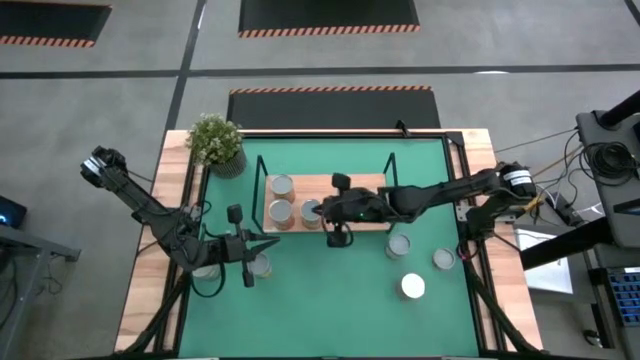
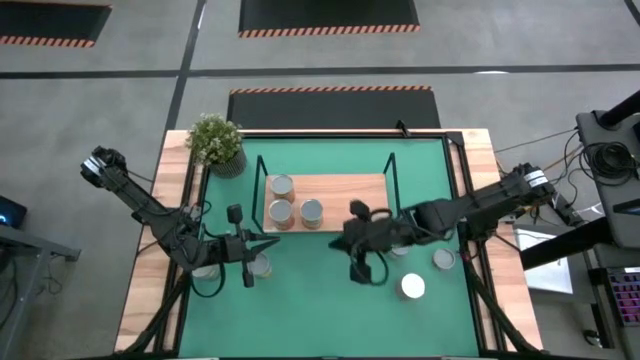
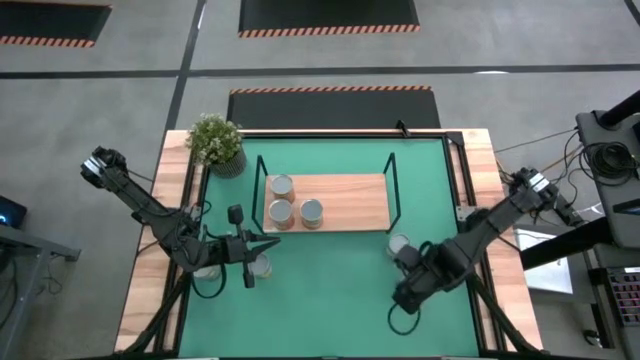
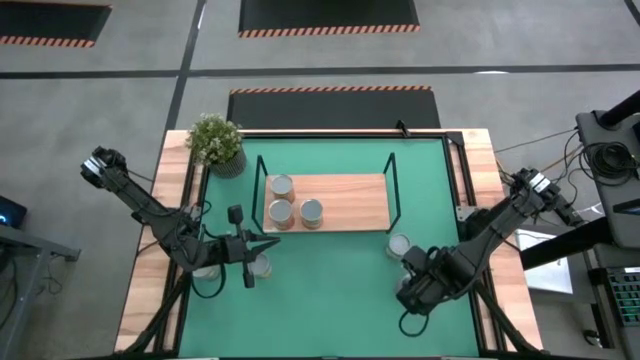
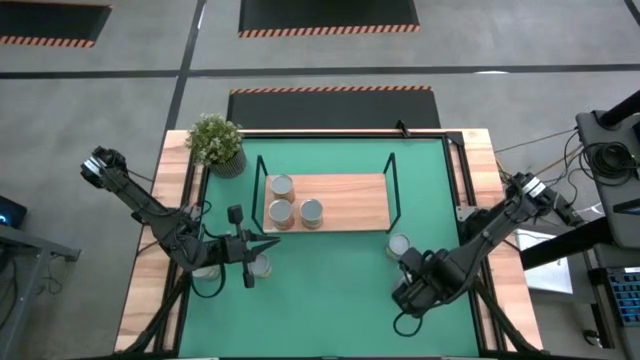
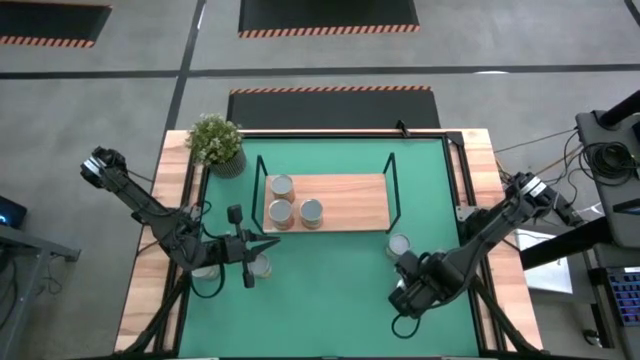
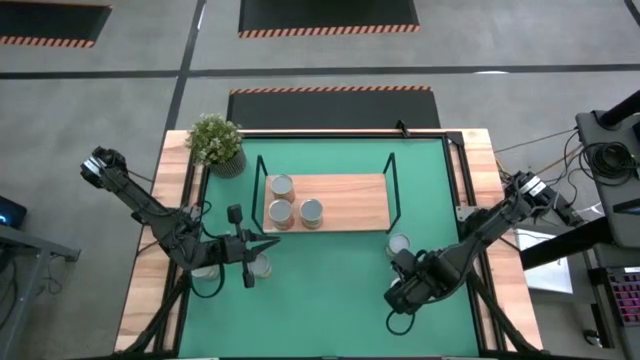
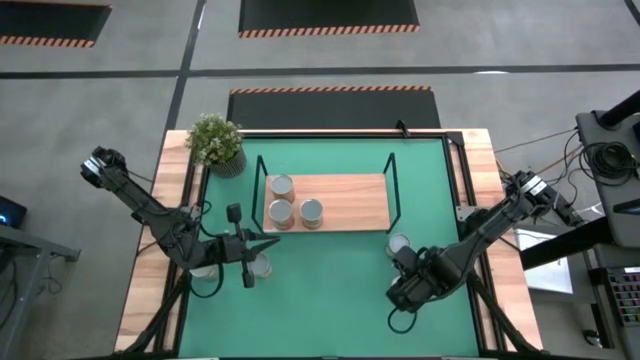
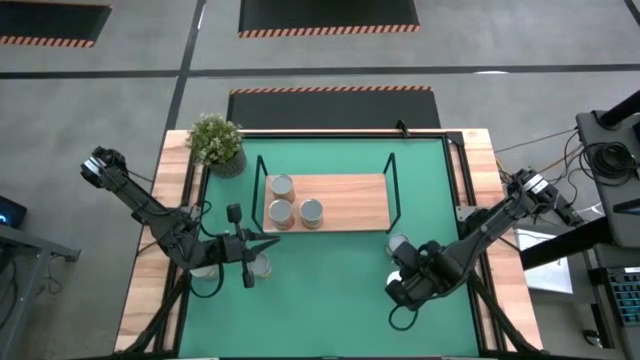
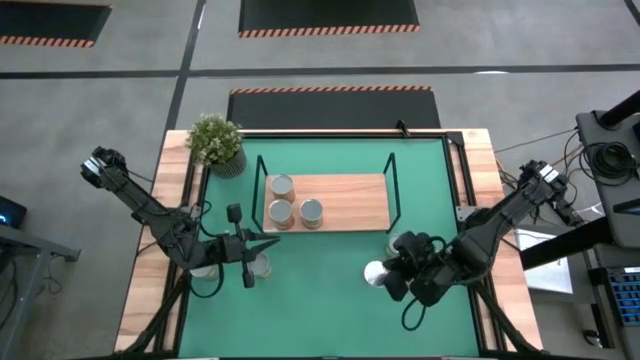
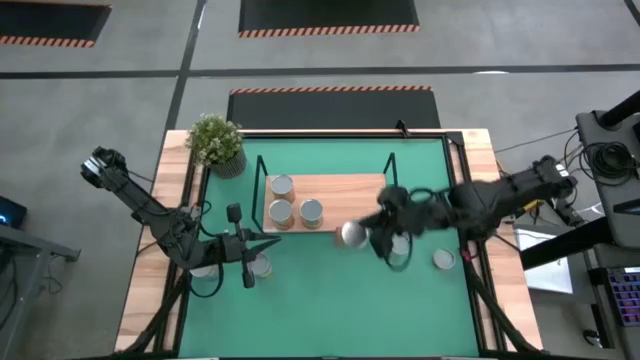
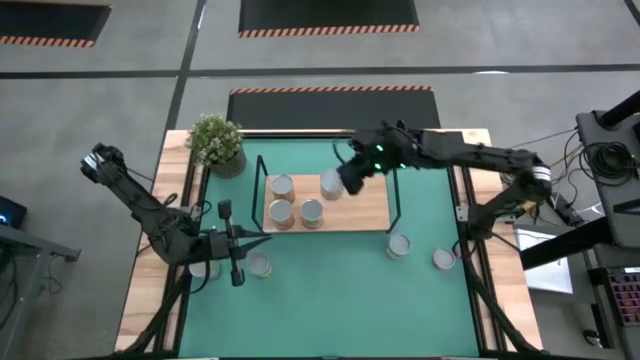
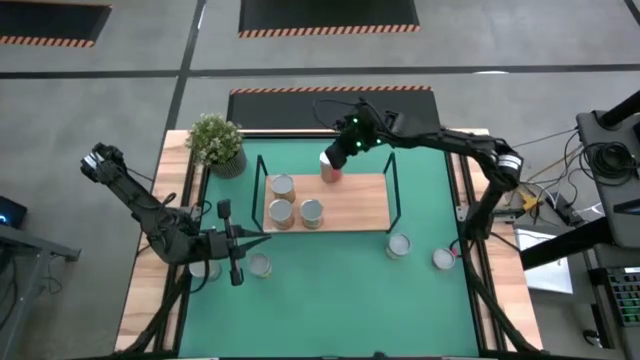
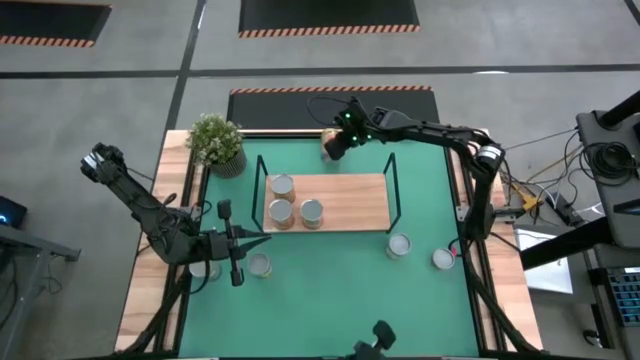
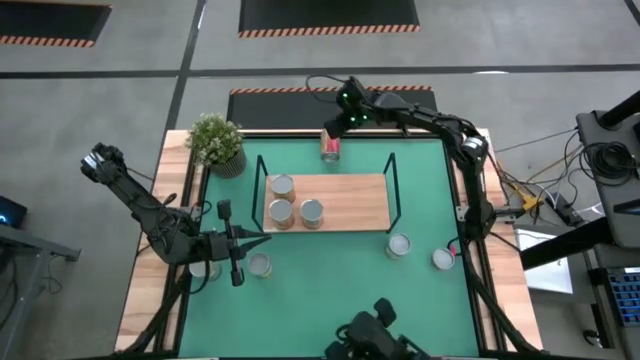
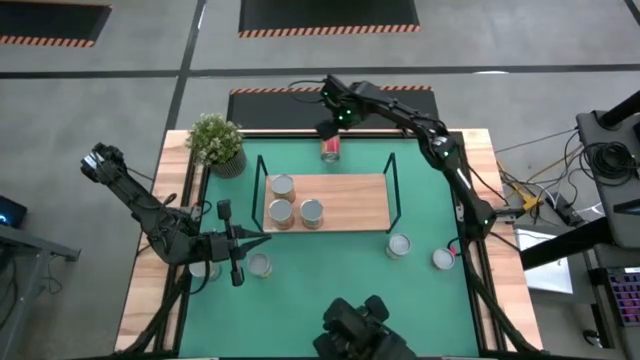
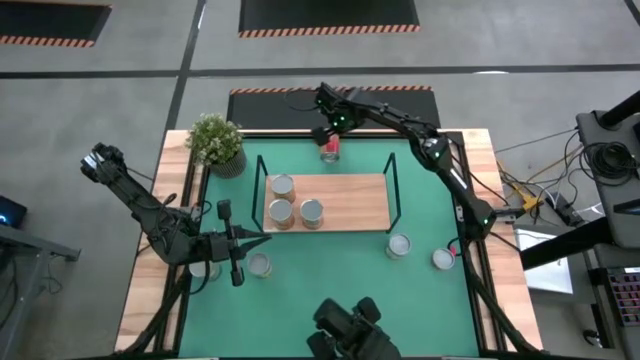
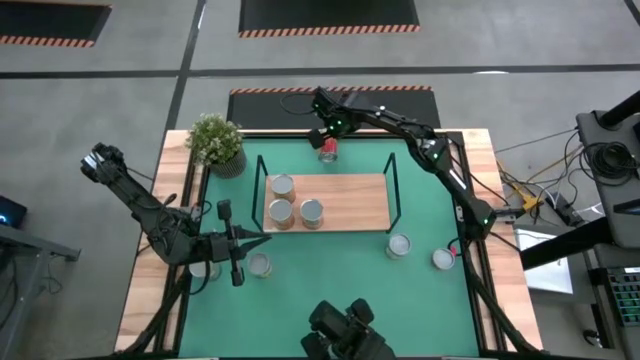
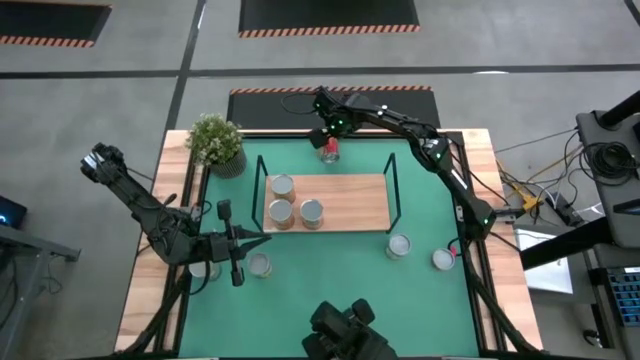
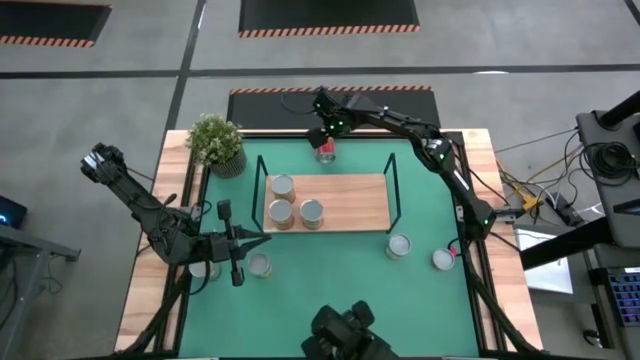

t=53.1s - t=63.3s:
Task: Pick and place cans onto a shelf
Put the canned pineapple on the shelf

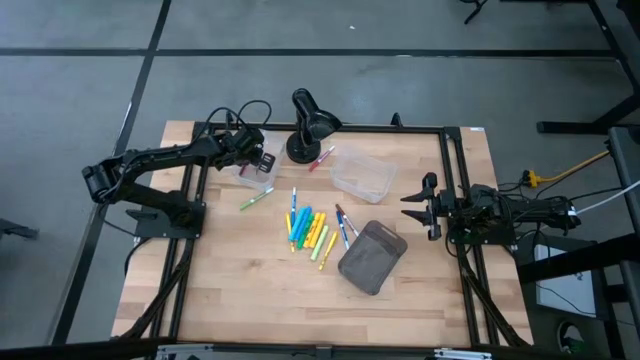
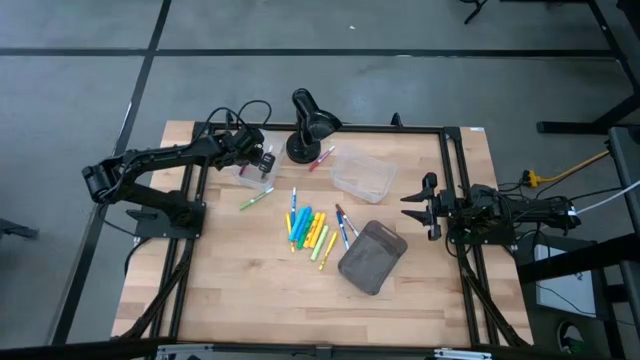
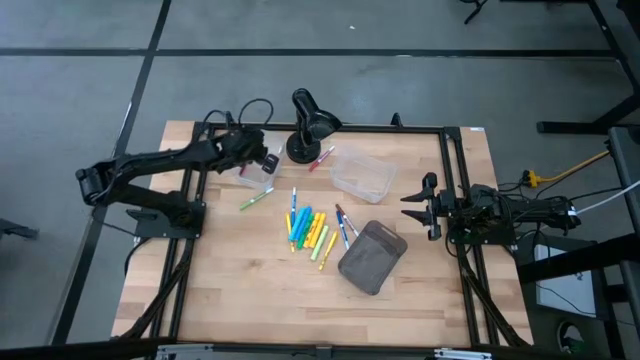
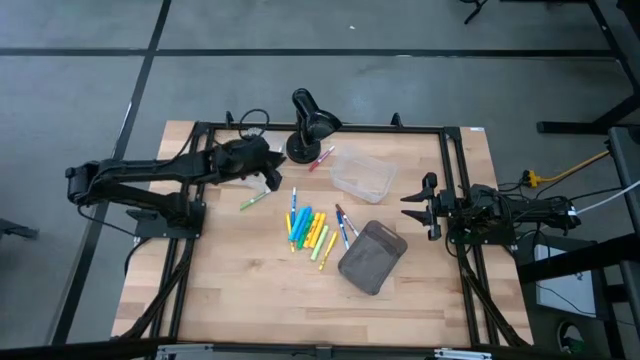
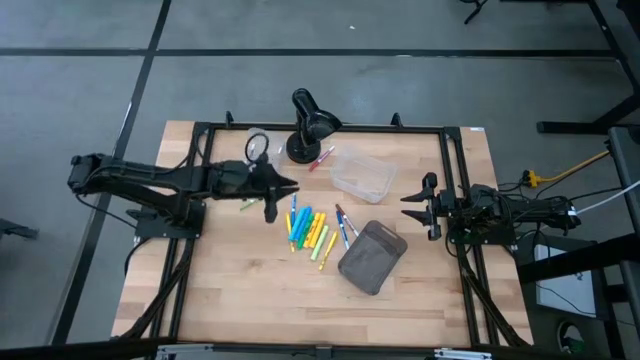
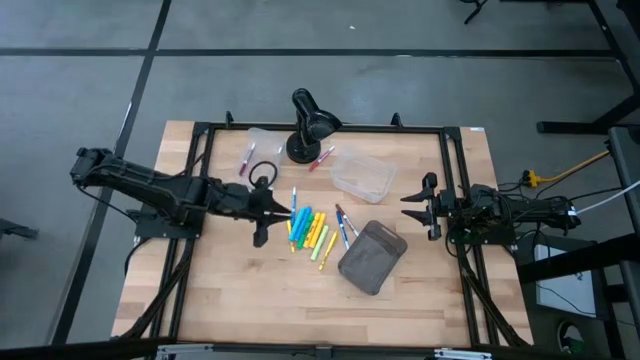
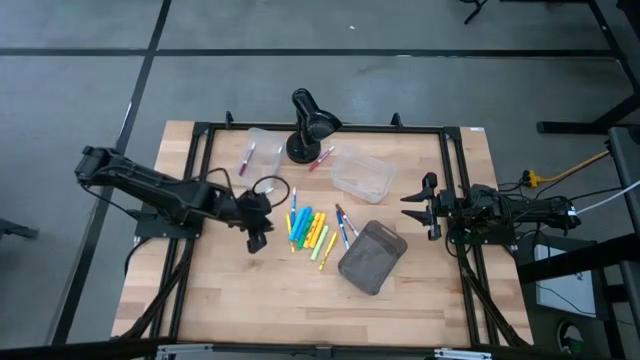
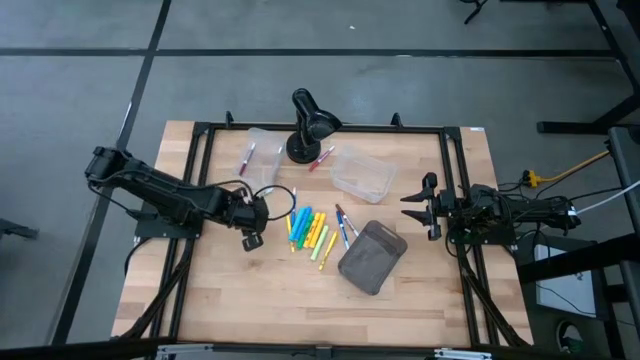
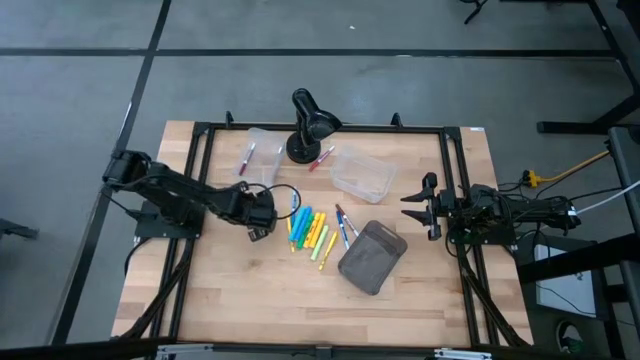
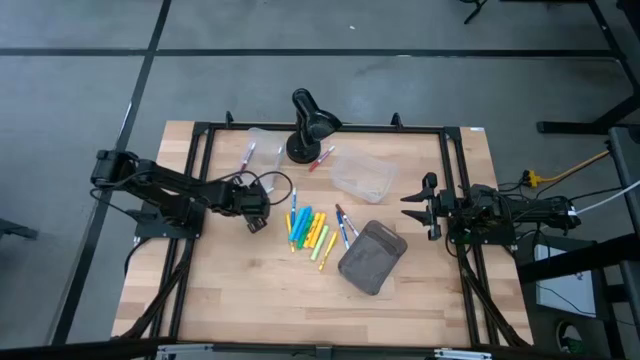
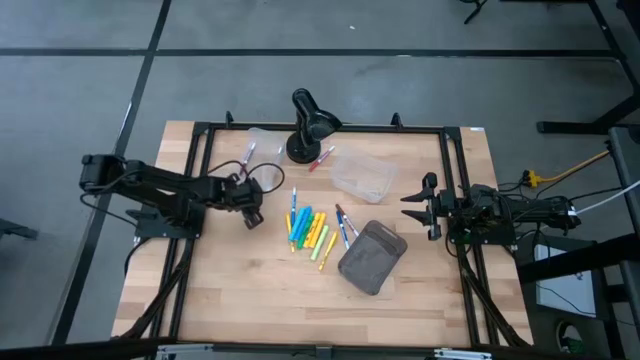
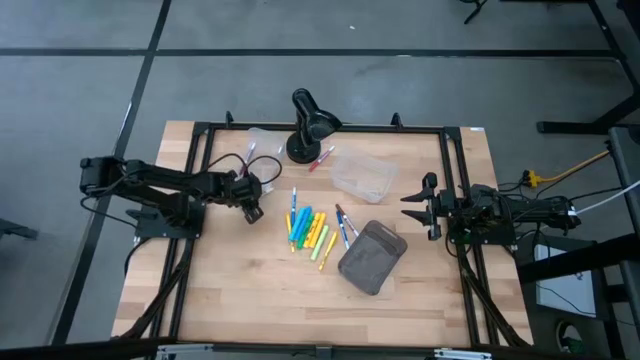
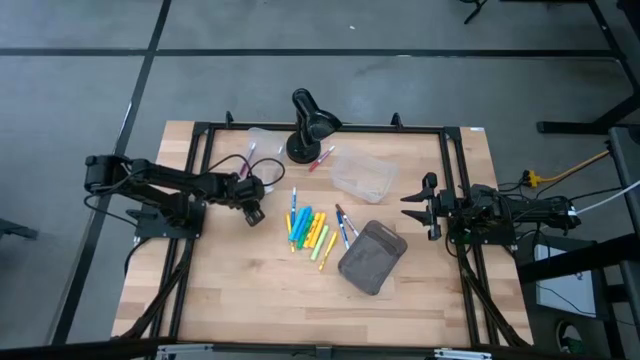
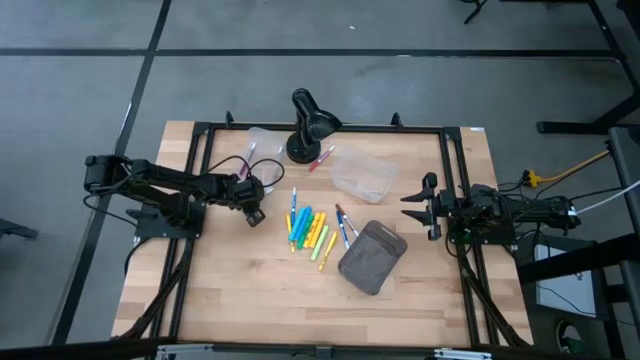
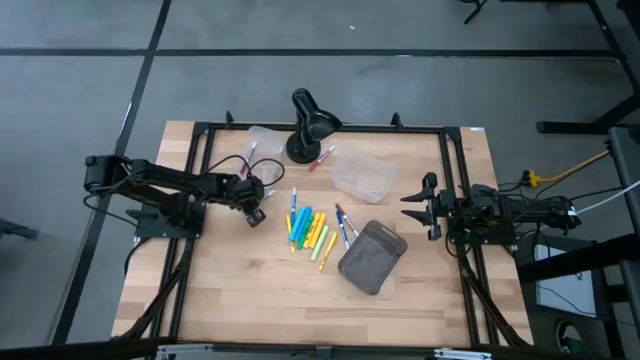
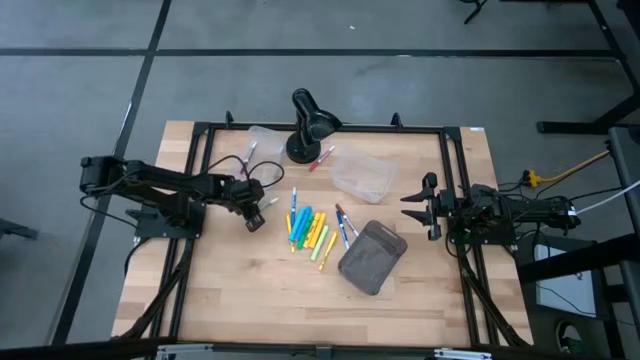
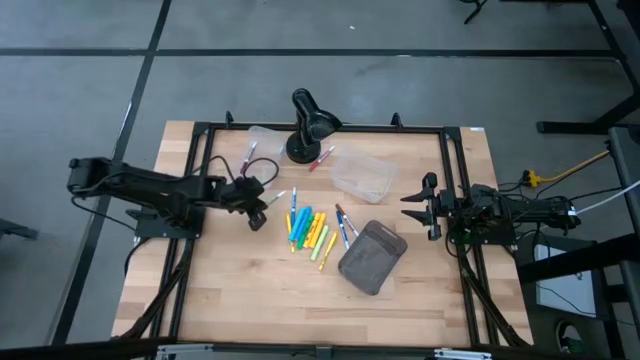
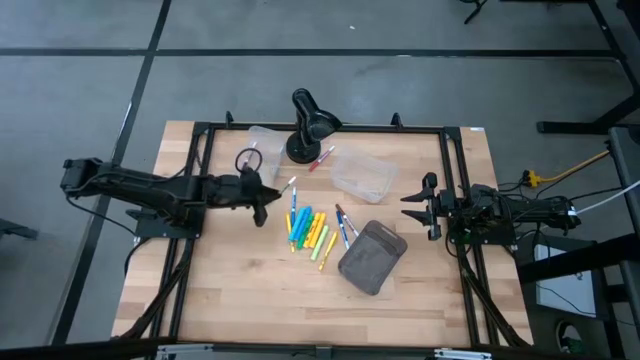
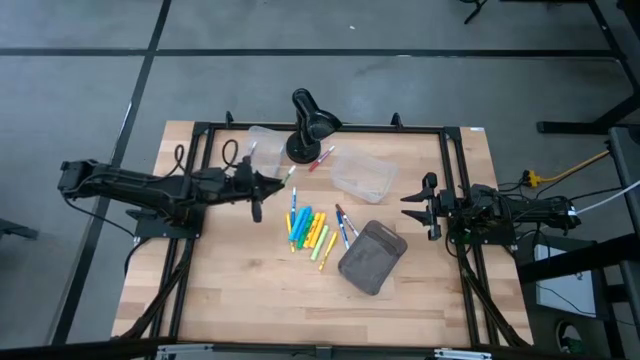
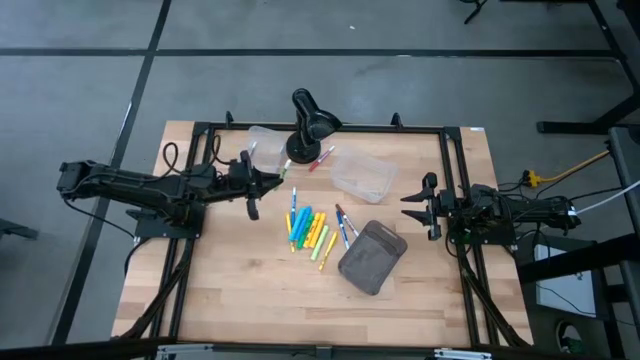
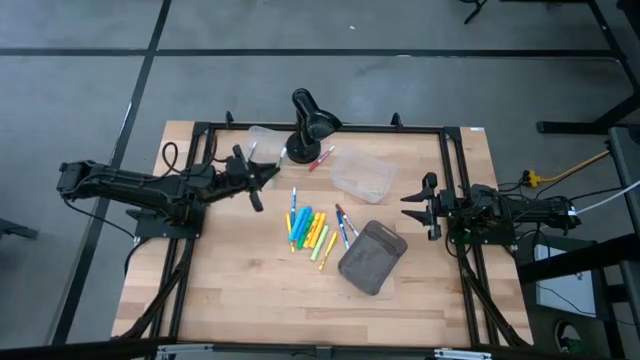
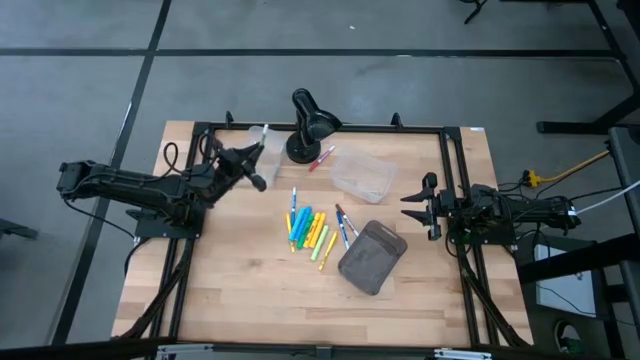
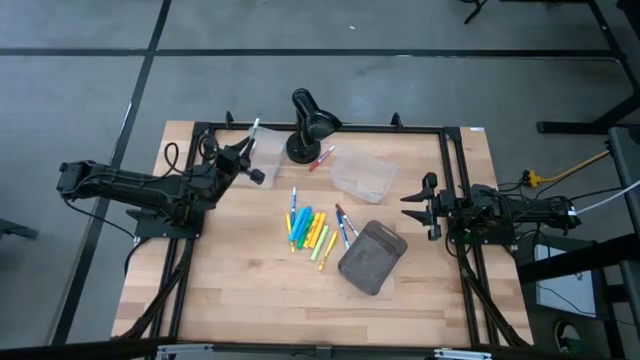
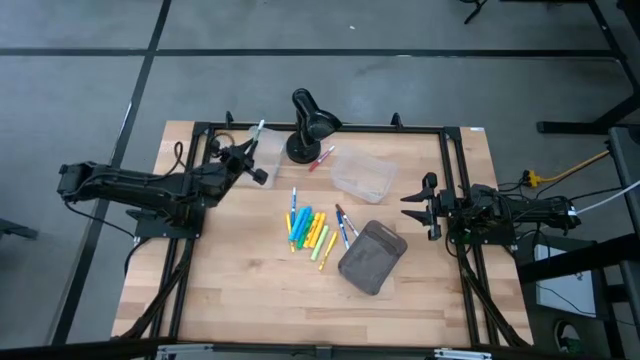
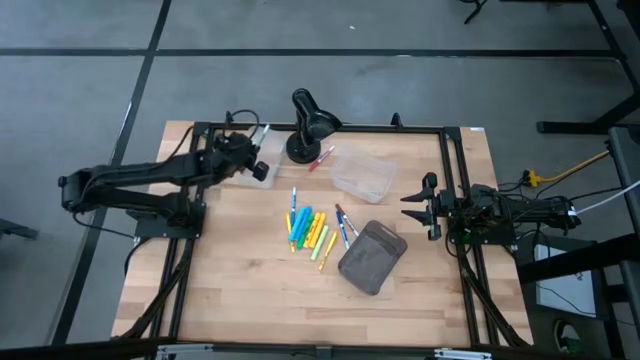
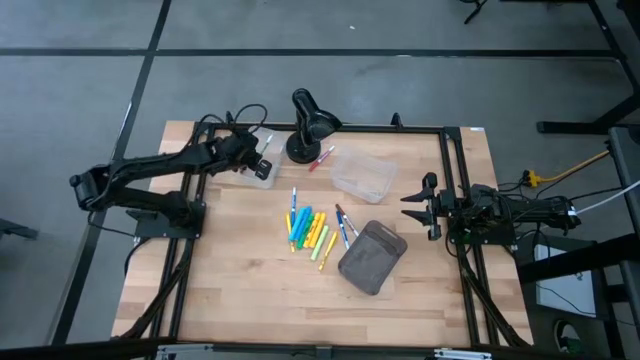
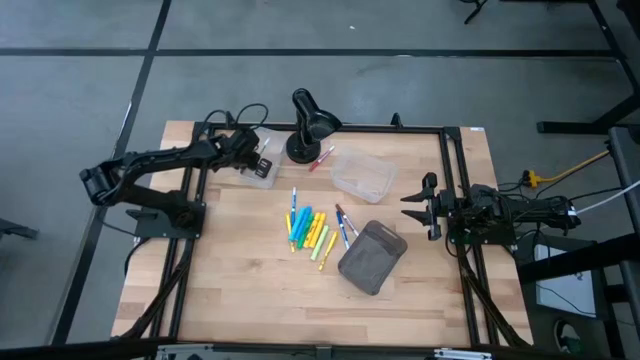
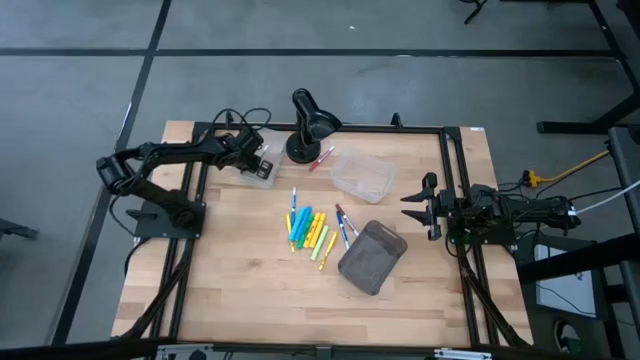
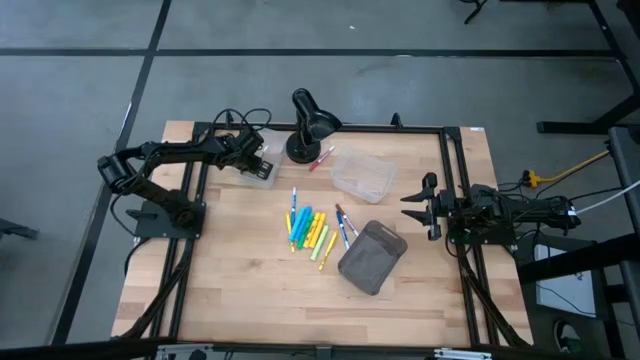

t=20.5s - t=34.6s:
Task: Pick & Place Markers
Put the light green marker pen into the left transparent bin
